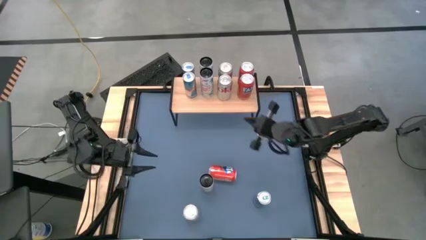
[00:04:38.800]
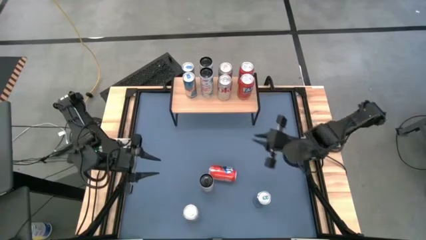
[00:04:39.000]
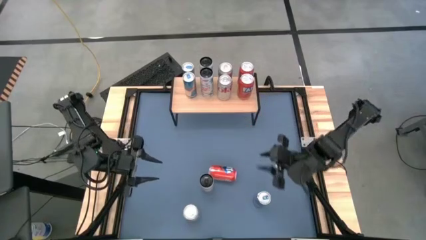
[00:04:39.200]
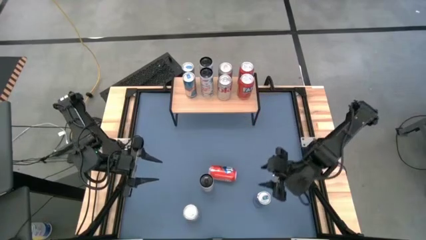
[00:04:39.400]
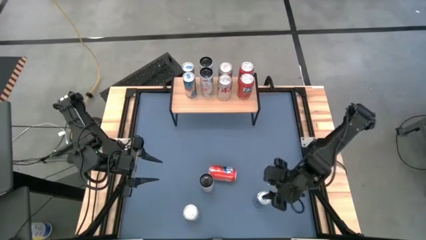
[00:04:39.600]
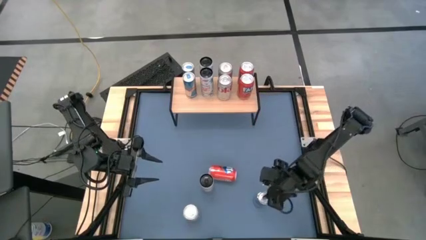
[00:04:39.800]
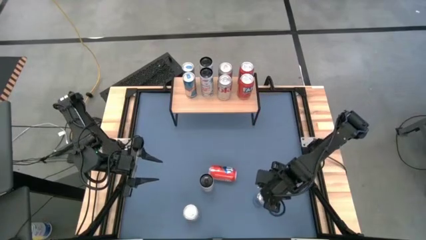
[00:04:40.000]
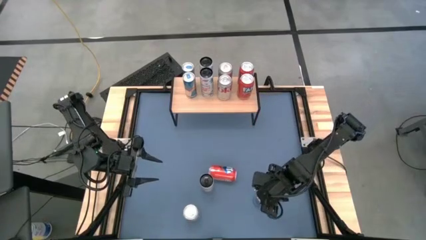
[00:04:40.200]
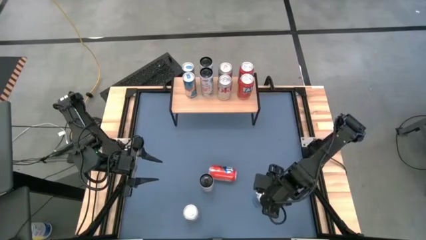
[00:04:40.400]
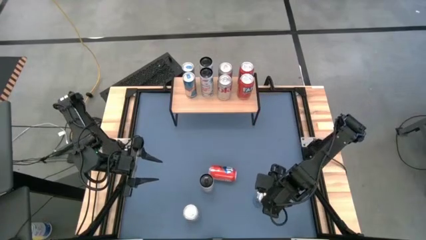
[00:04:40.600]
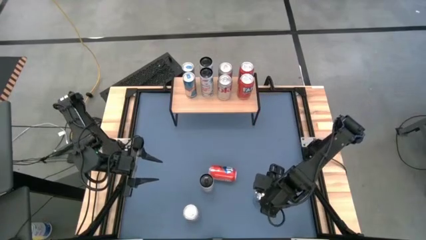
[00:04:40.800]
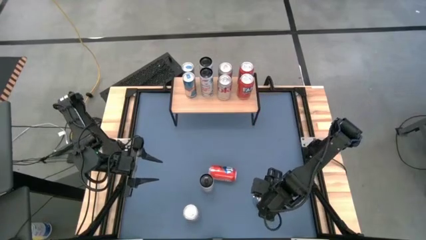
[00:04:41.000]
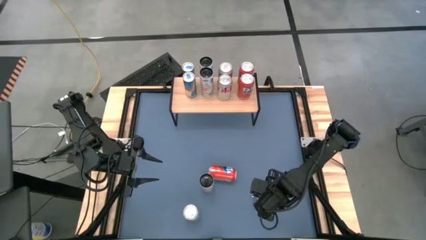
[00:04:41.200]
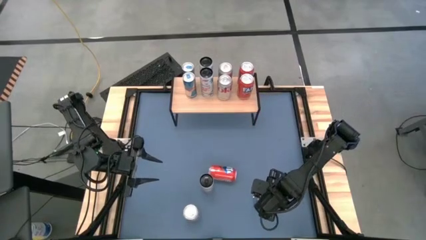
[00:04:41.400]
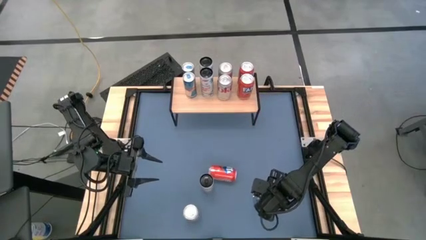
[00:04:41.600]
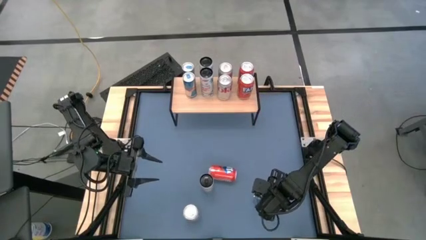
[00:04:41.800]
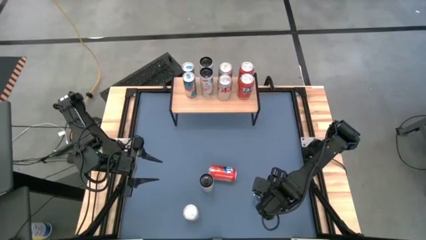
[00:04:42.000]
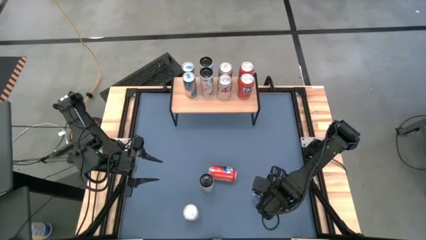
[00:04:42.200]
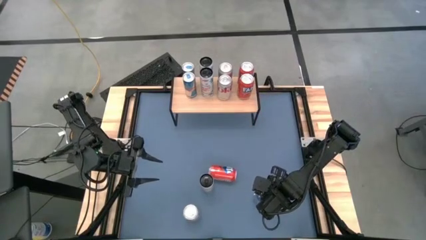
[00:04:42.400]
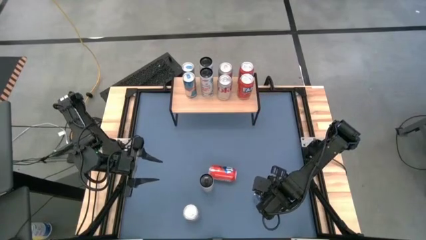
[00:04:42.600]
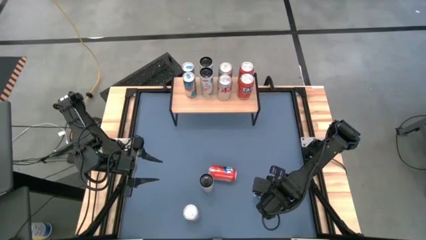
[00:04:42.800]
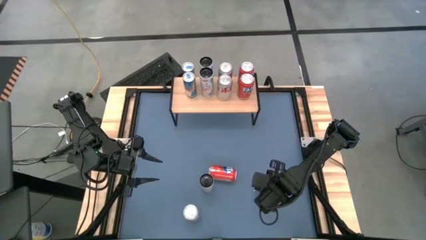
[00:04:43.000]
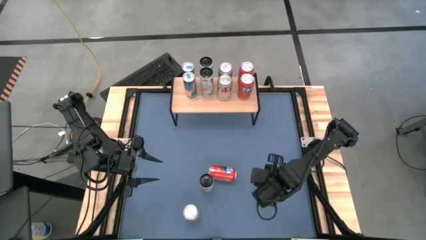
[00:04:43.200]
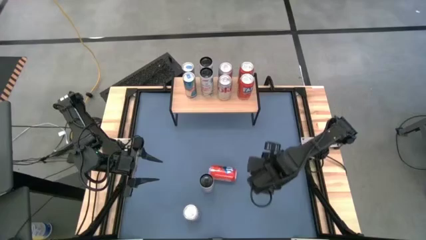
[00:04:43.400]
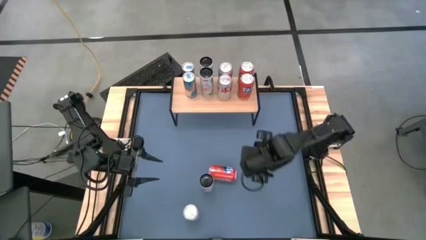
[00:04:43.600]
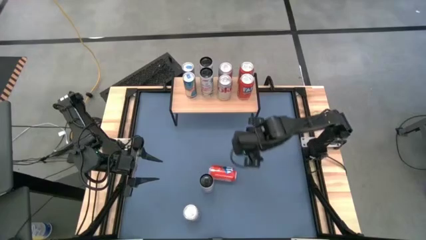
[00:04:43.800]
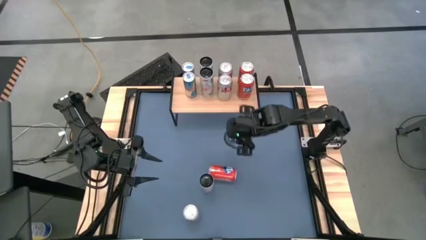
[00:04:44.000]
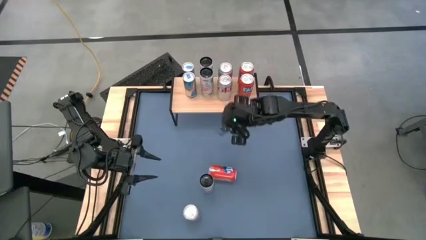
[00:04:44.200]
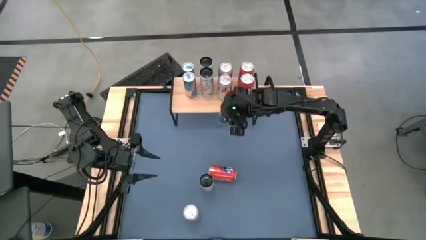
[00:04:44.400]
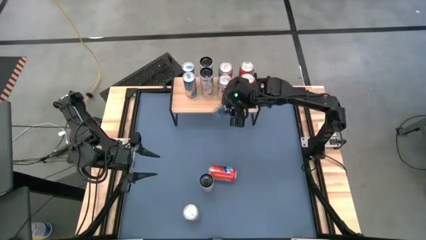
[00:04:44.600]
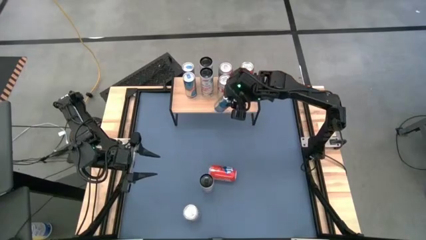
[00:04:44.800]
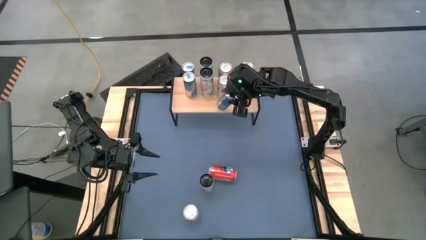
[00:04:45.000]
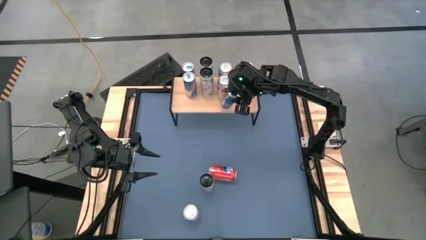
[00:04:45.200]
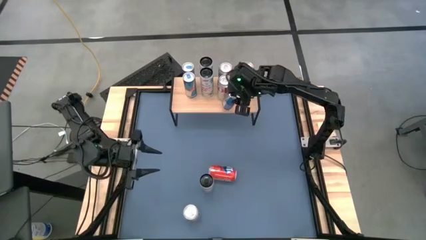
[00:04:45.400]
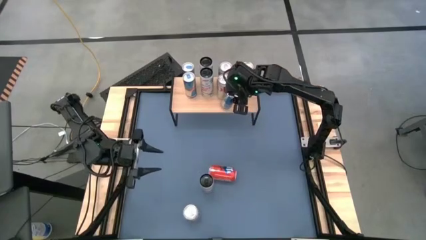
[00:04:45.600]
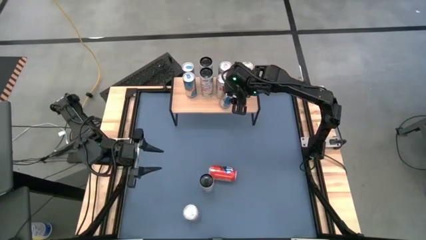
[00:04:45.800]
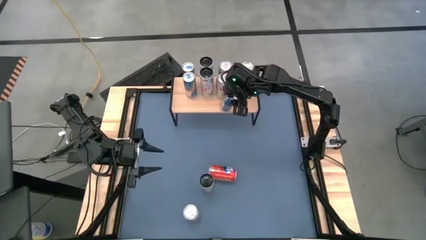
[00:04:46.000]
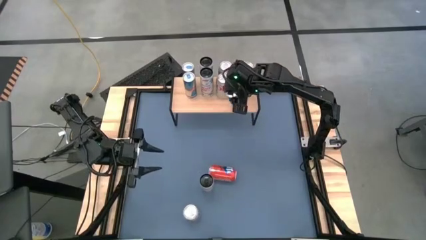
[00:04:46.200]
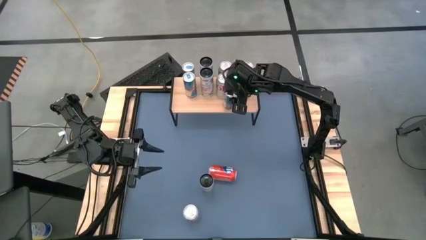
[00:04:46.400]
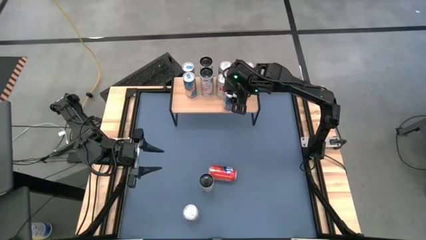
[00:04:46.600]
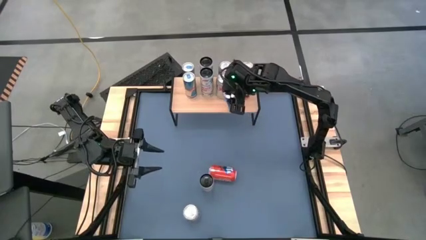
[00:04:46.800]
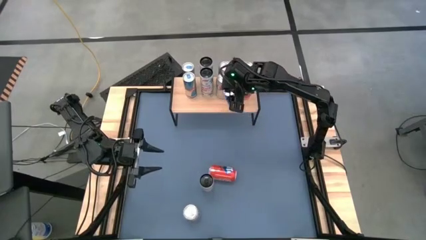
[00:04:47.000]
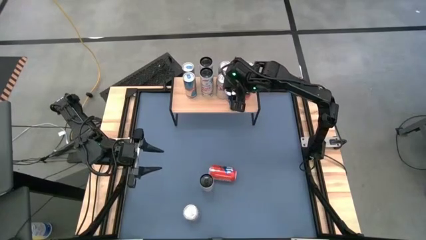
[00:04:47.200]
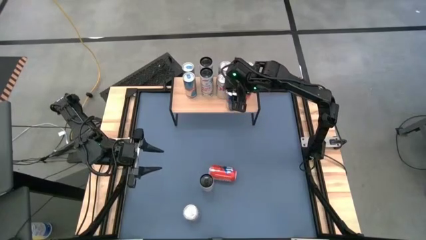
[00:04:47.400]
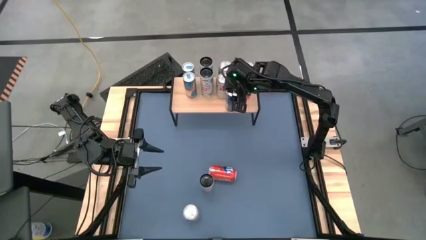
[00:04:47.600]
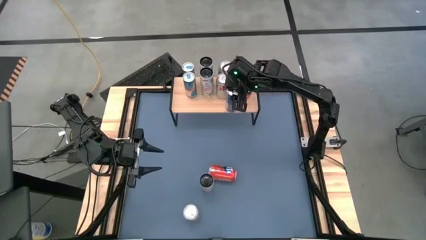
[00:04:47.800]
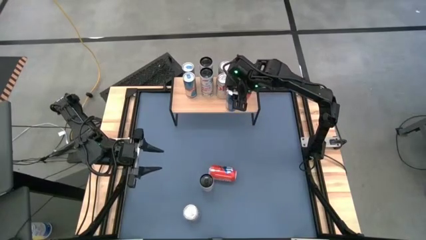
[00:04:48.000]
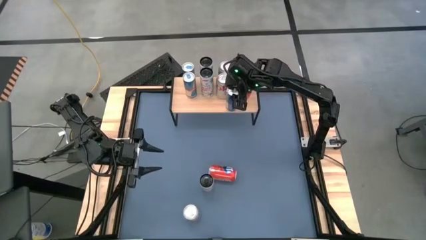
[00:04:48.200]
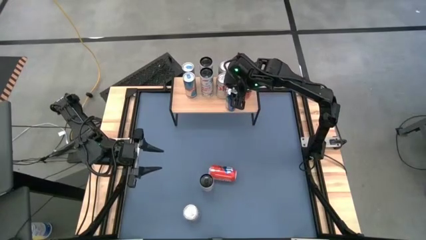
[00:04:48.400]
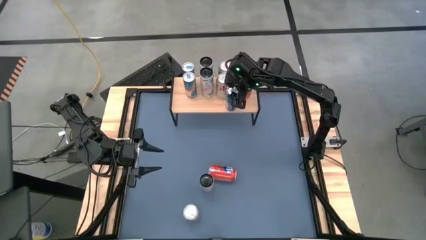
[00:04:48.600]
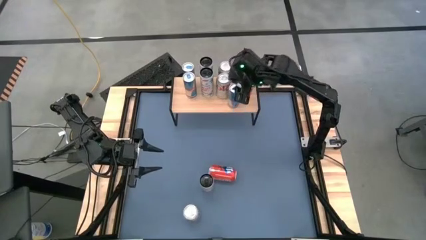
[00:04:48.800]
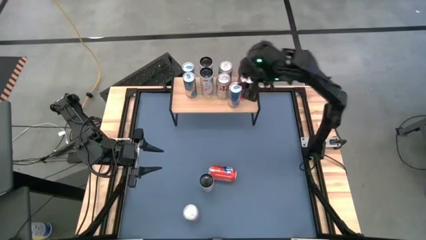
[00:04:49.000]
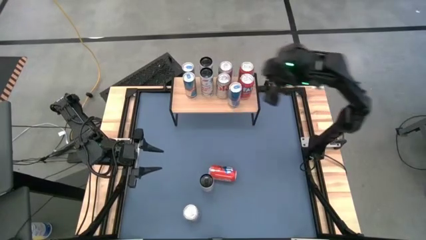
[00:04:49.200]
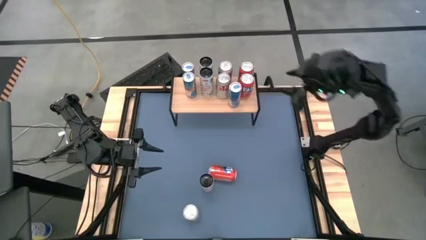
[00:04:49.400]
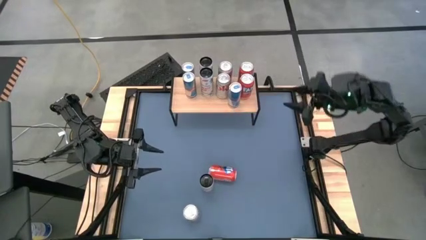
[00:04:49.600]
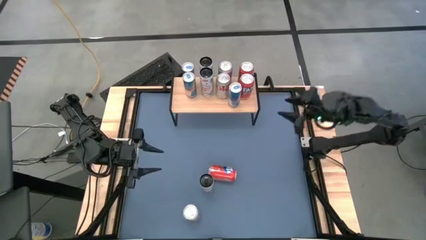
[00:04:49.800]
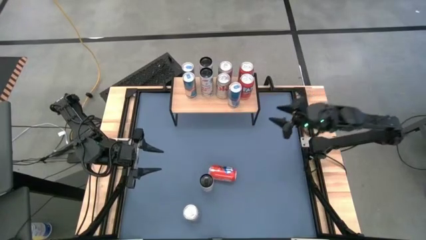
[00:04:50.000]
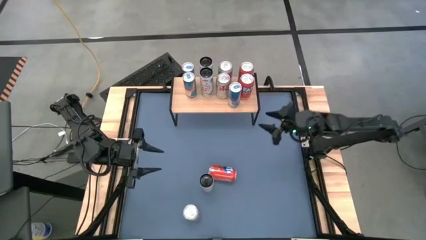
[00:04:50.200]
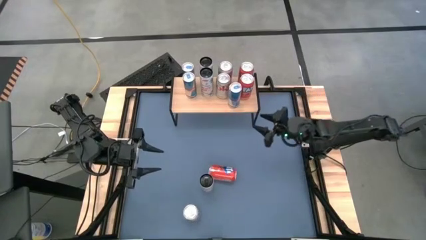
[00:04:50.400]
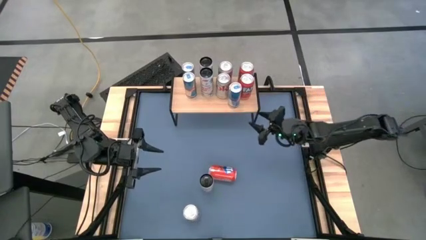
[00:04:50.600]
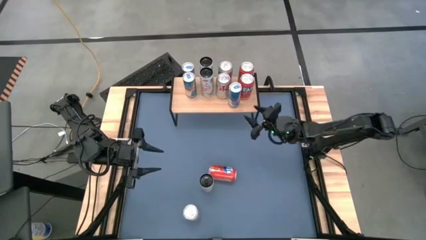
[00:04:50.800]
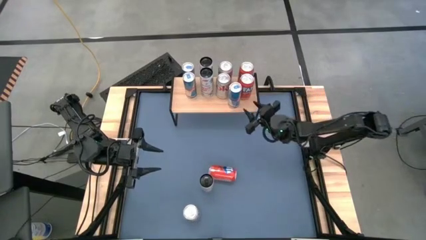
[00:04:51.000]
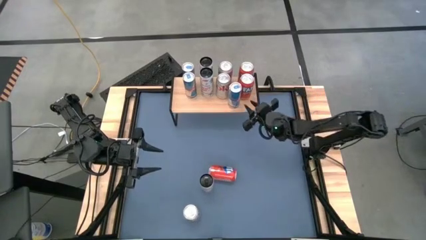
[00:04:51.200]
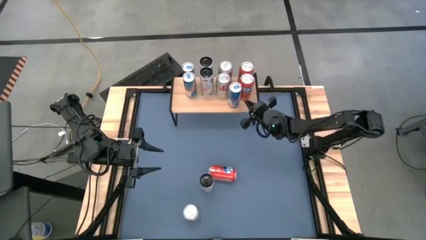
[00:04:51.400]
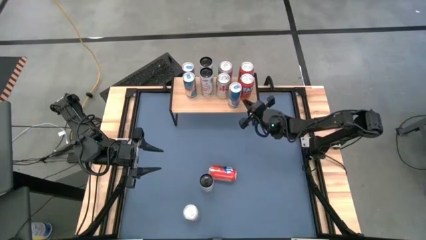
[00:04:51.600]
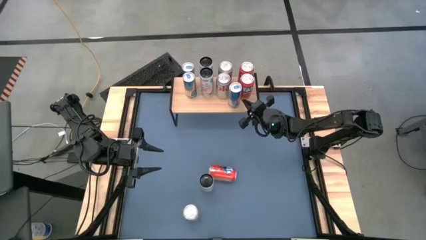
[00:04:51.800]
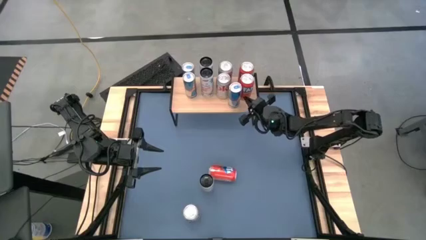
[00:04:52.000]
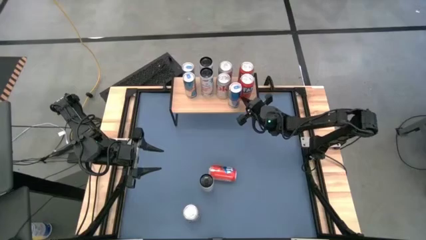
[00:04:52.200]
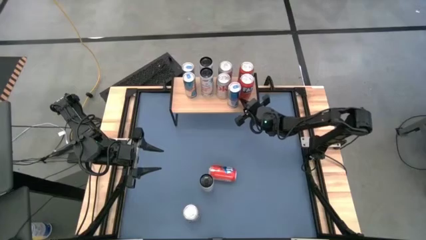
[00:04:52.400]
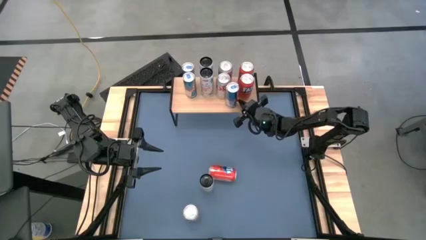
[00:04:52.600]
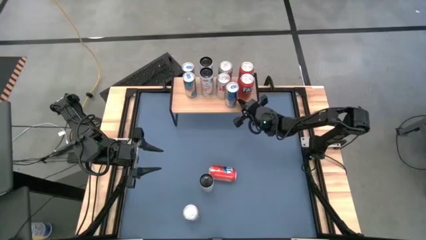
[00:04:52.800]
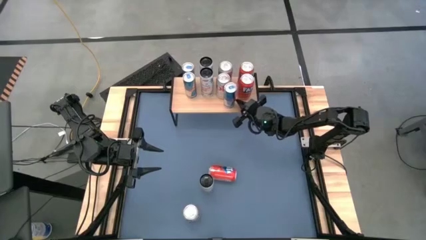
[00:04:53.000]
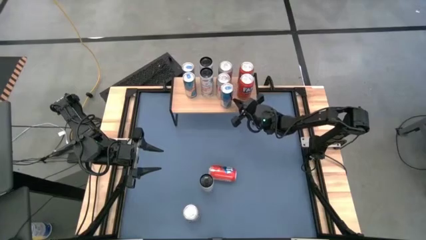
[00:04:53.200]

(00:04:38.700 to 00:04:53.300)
Task: Place canned beverage on shelf
Put the blue soda can on the shelf aligned with the other blue soda can
